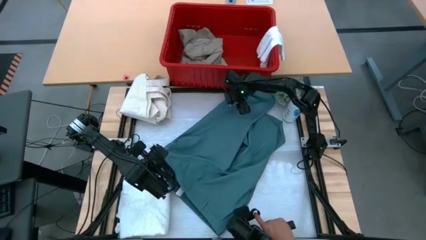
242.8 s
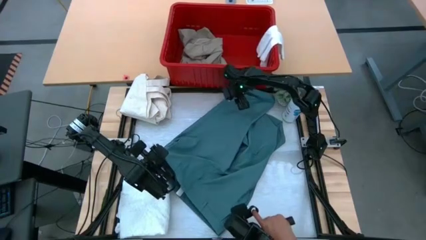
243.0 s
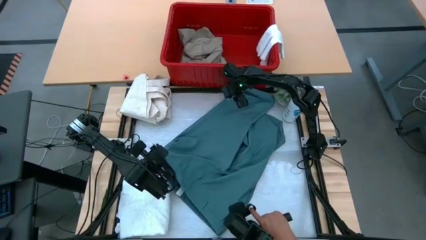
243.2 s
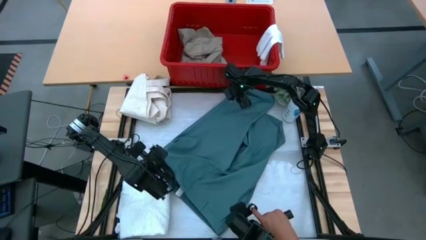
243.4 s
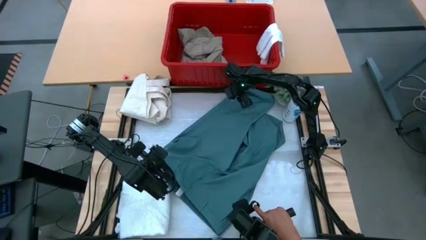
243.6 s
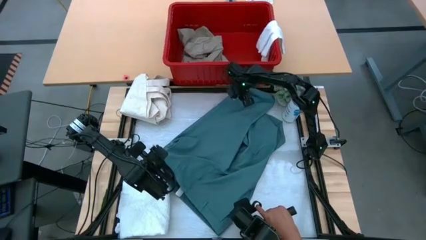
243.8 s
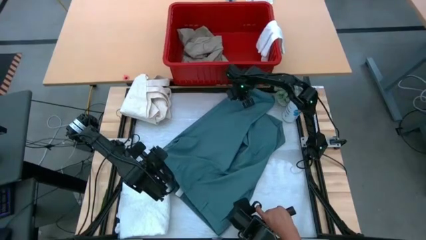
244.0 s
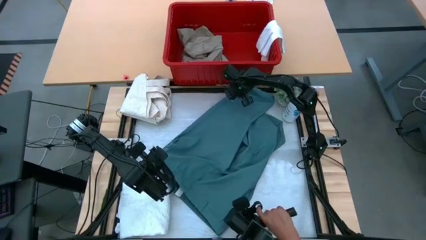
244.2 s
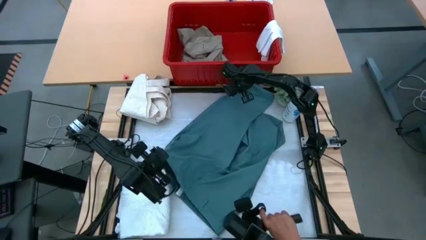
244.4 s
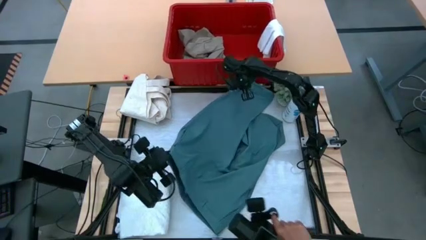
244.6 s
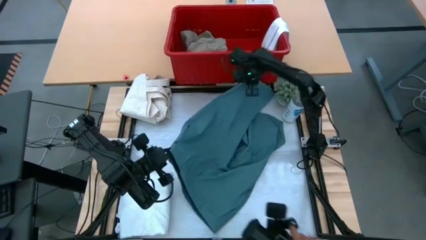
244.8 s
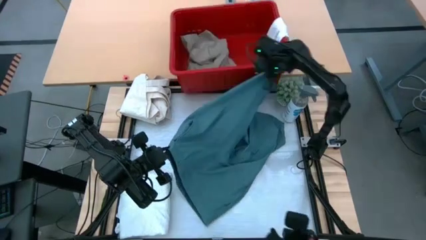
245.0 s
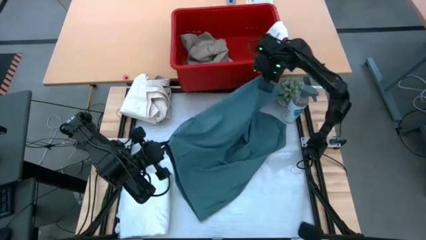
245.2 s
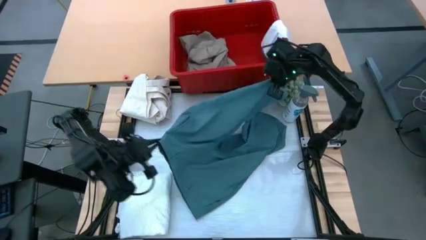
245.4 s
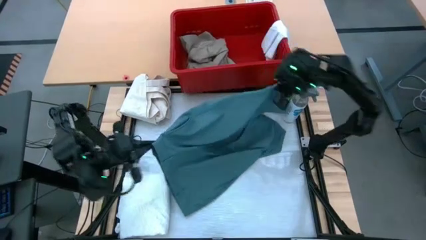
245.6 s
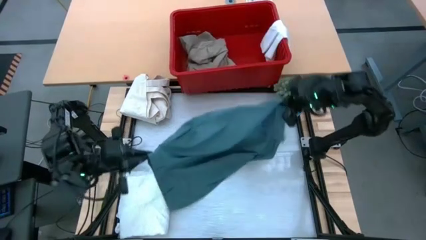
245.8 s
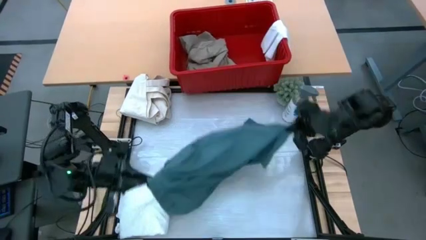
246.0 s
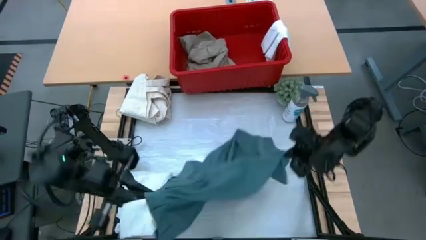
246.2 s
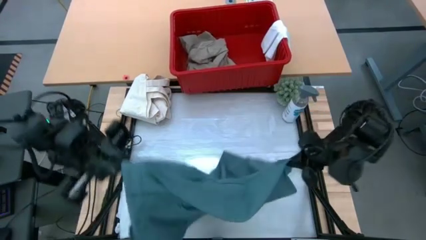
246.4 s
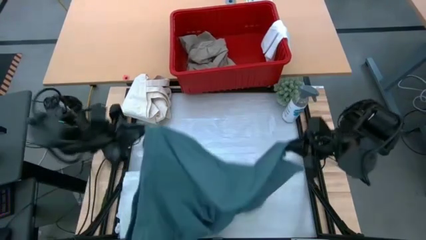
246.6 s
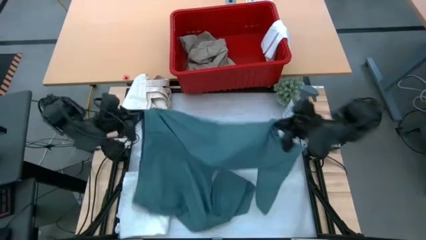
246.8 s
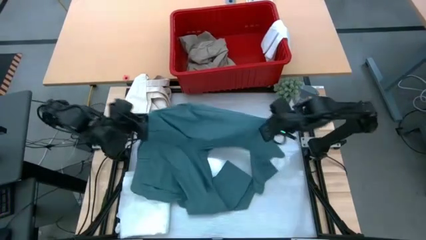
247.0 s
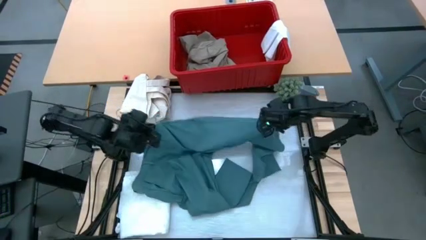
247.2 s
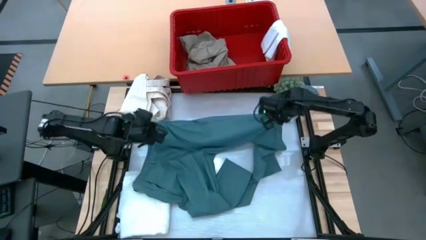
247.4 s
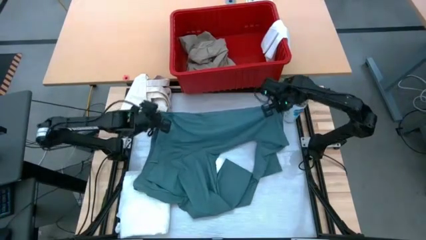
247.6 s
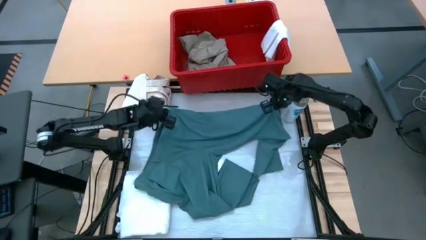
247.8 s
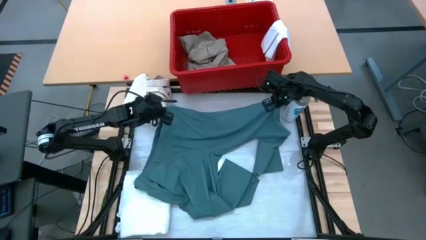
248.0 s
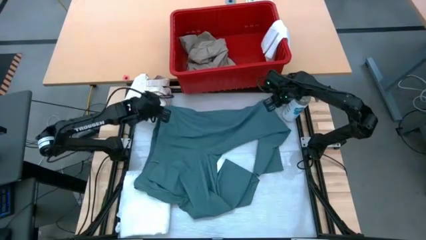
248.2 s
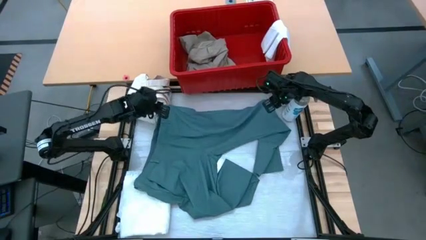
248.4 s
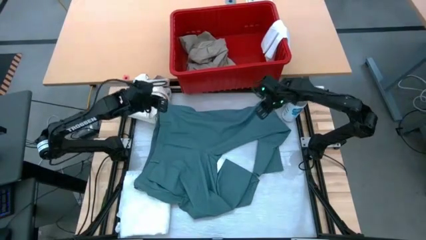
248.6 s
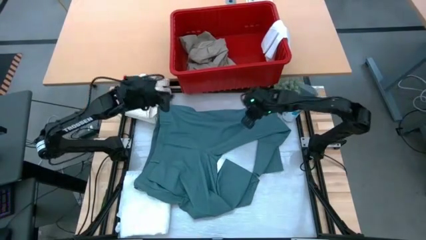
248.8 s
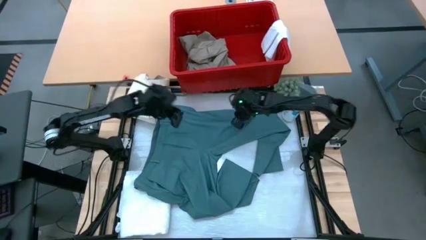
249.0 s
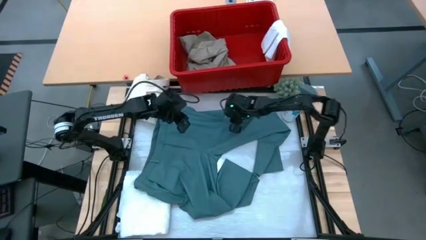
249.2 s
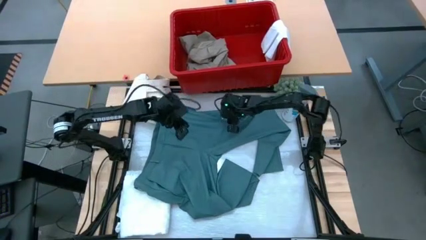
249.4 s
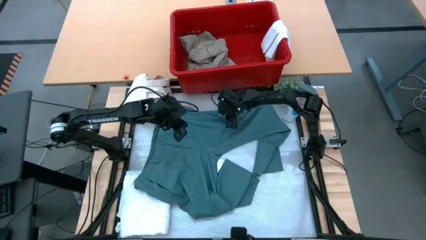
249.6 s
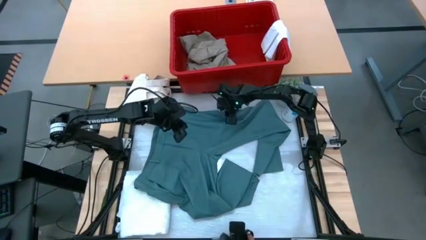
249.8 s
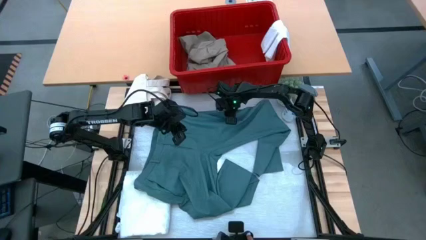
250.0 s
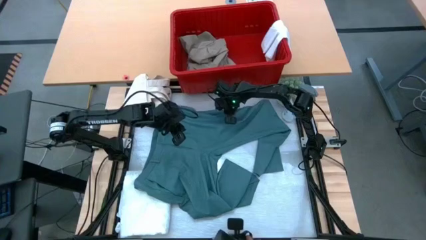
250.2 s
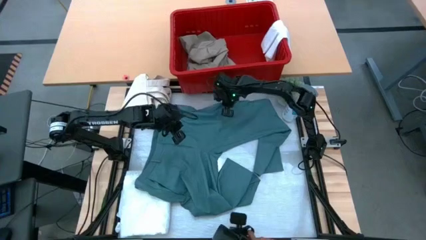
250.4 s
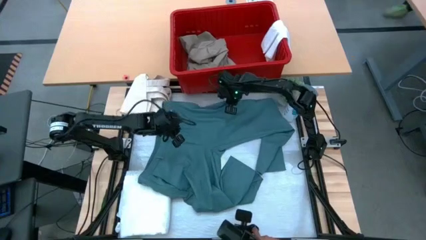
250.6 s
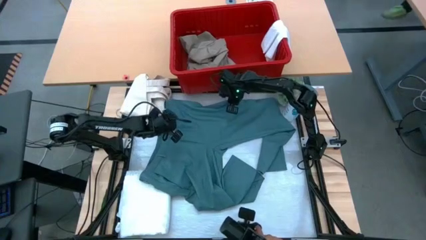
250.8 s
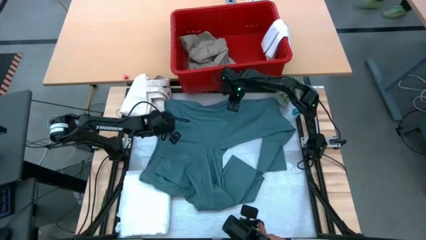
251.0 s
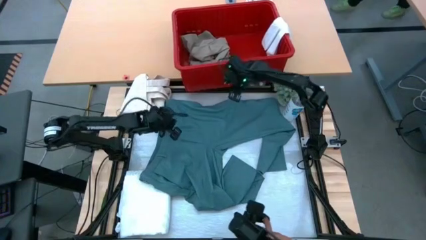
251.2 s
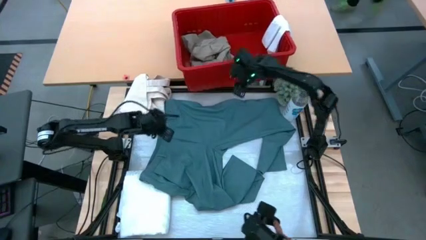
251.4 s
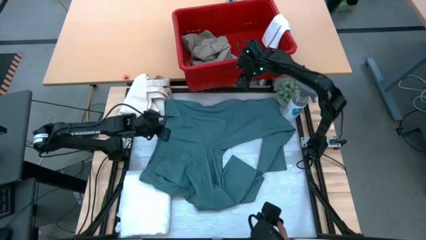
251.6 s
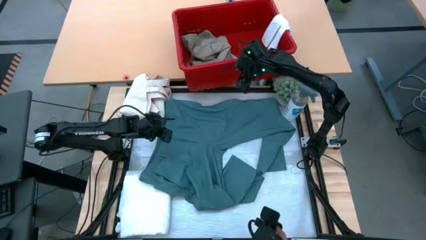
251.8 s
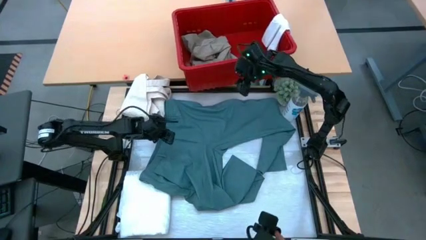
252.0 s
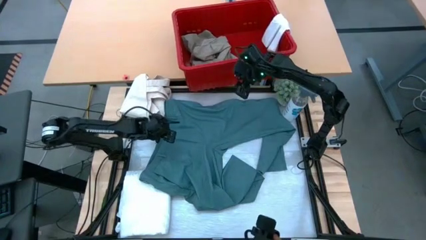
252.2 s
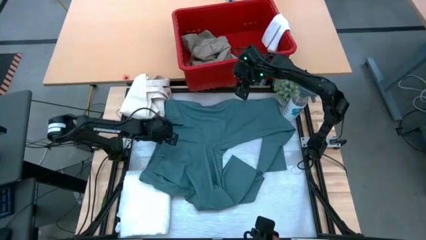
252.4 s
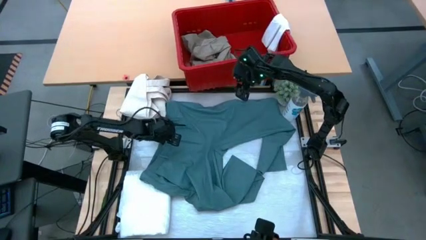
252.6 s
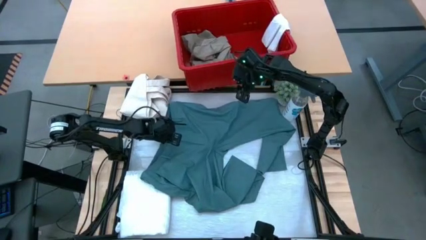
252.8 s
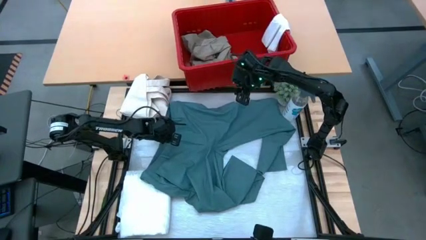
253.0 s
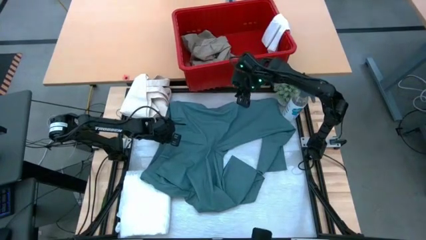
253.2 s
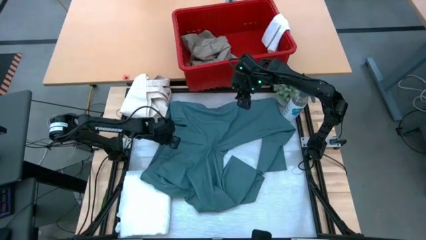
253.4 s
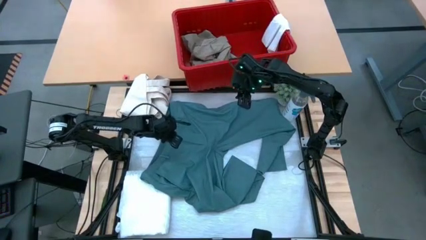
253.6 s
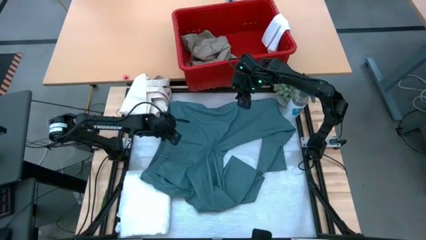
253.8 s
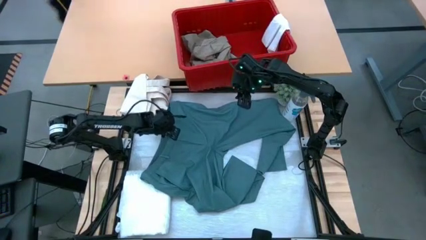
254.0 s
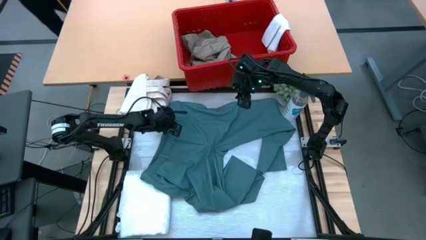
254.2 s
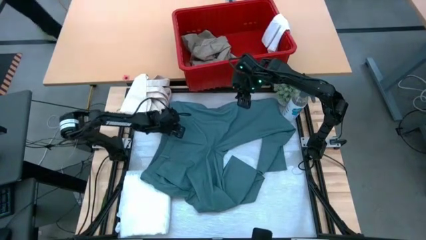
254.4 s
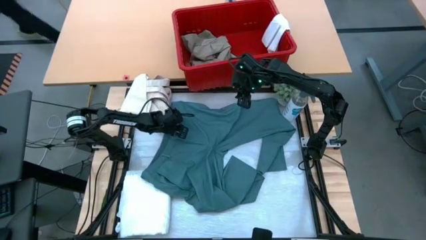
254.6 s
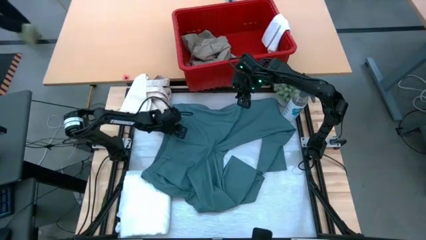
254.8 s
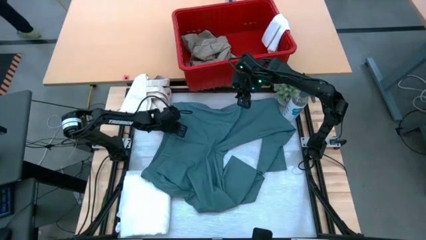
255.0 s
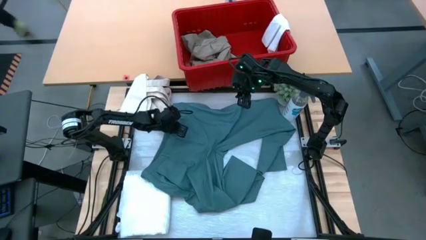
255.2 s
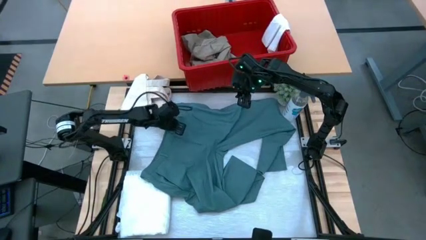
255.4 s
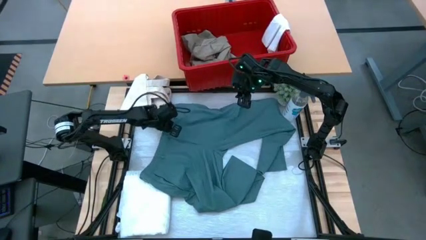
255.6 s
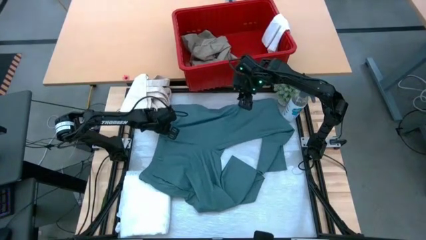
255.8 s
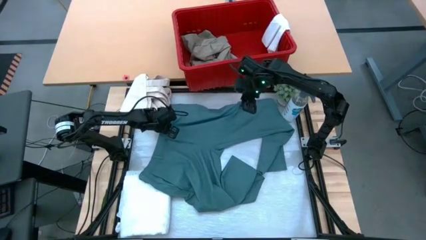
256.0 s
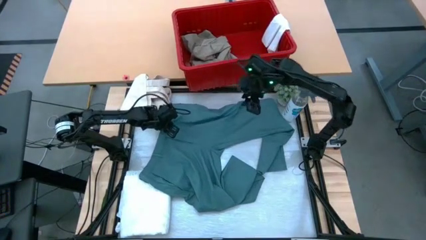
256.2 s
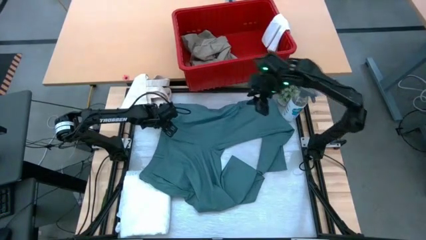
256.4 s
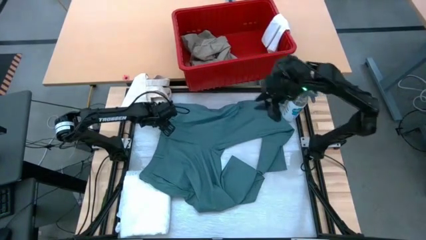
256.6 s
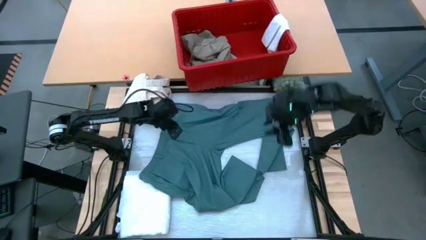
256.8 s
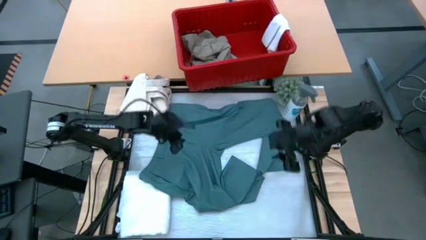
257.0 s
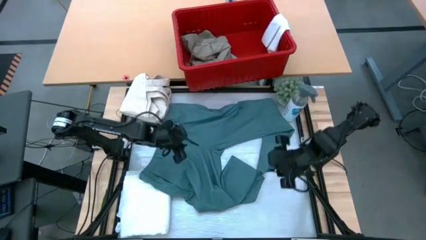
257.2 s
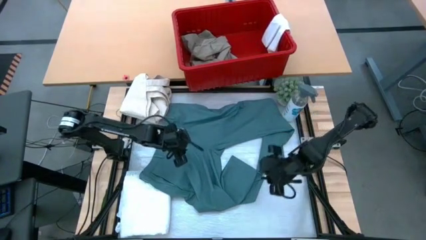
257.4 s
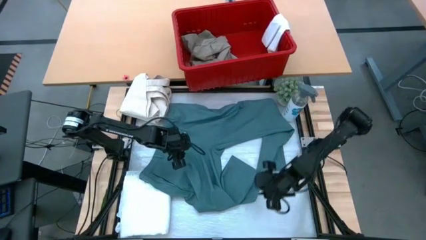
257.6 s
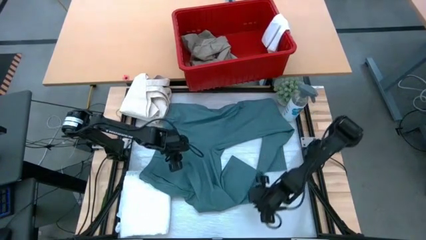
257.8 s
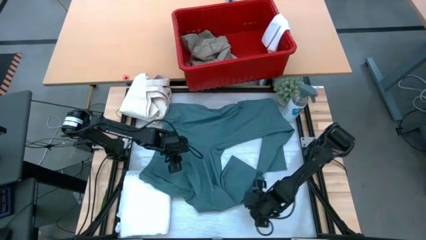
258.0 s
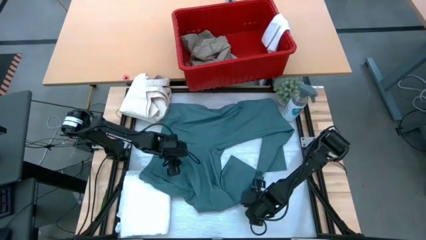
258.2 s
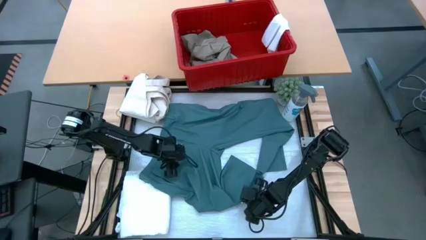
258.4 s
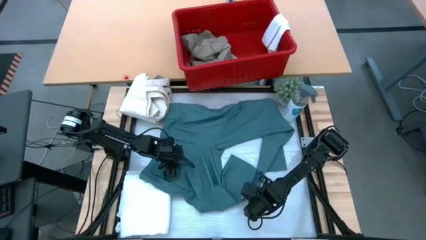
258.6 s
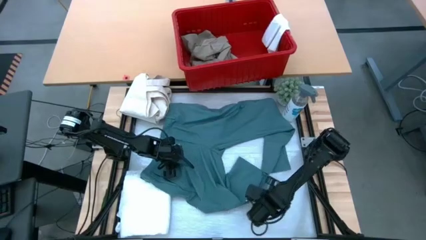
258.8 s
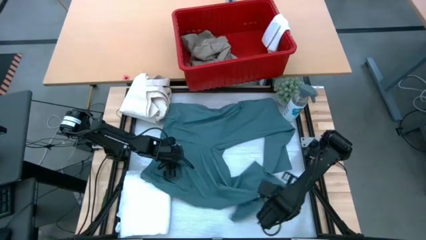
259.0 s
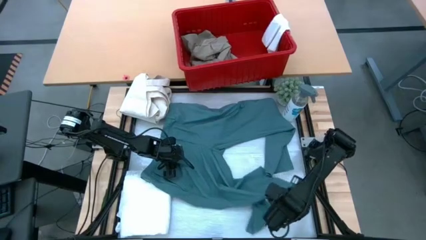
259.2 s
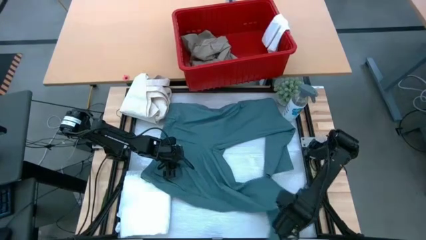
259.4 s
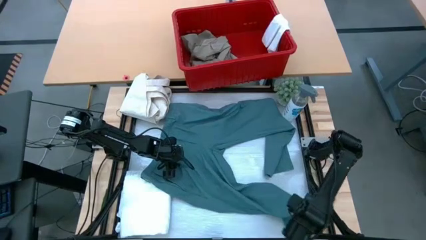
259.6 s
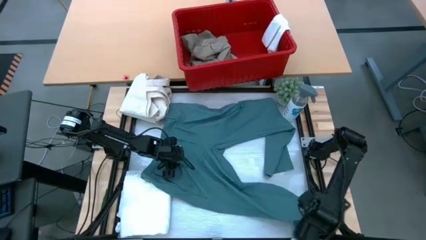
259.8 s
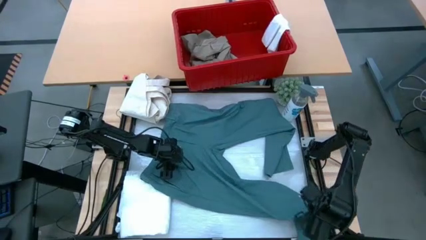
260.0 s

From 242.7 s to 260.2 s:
Task: Fold Laundry from Bin
Fold the blue pants
